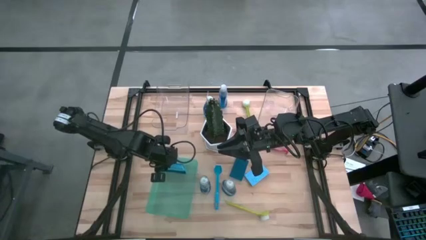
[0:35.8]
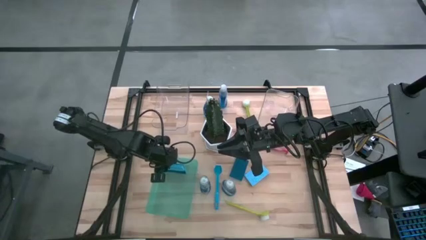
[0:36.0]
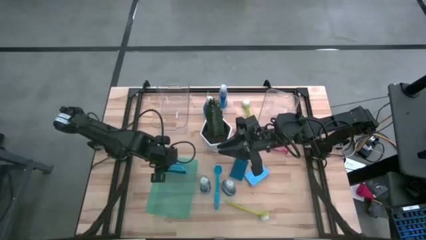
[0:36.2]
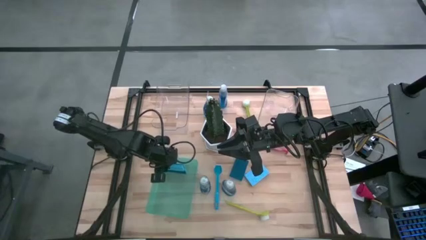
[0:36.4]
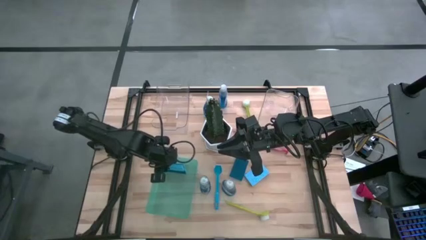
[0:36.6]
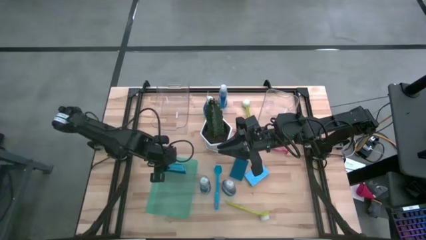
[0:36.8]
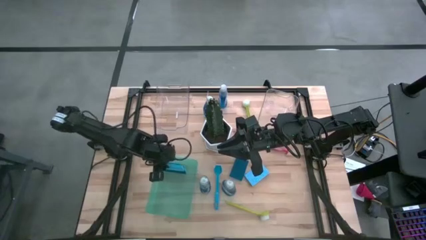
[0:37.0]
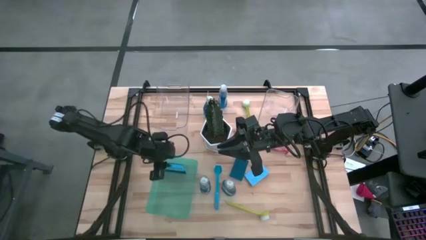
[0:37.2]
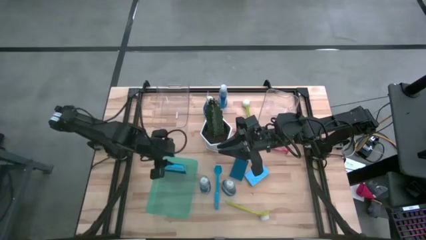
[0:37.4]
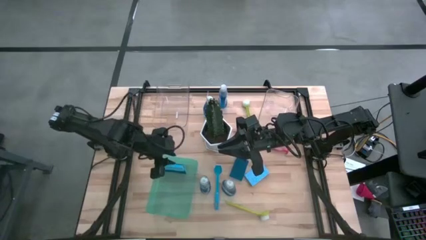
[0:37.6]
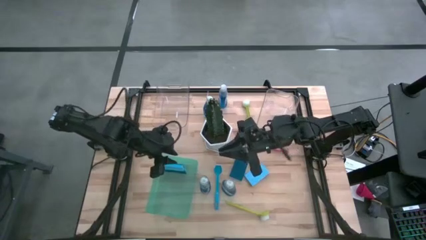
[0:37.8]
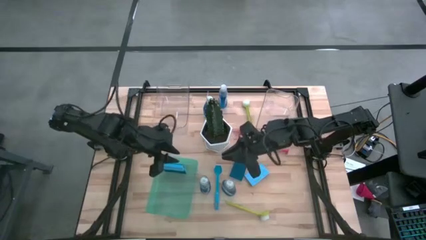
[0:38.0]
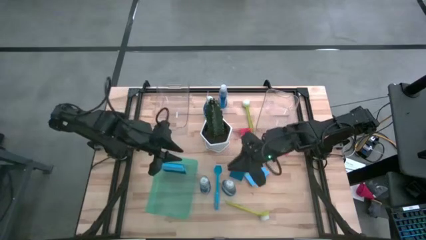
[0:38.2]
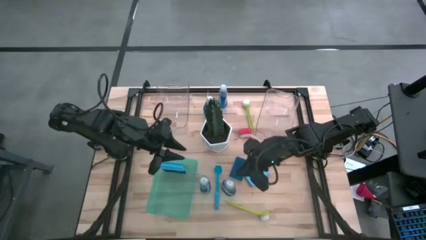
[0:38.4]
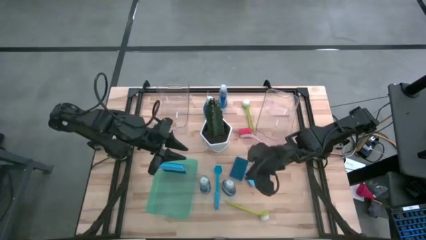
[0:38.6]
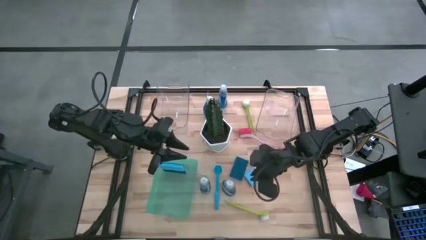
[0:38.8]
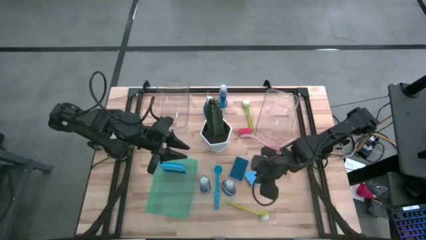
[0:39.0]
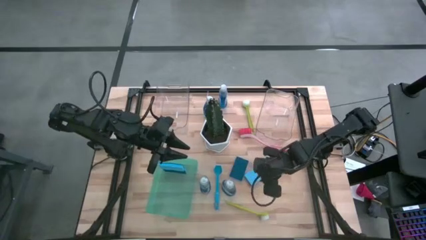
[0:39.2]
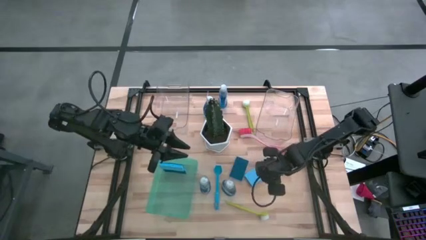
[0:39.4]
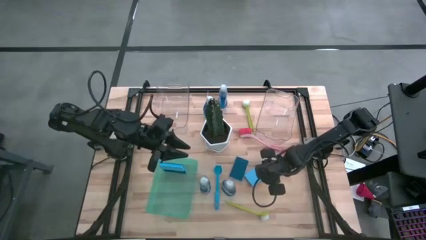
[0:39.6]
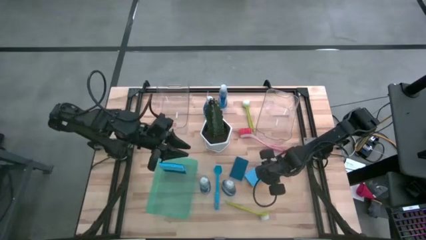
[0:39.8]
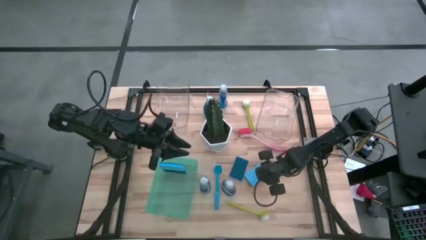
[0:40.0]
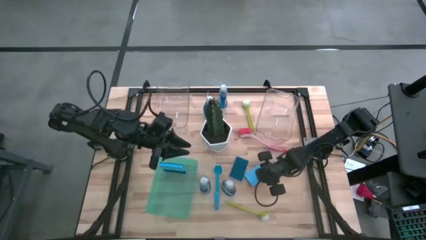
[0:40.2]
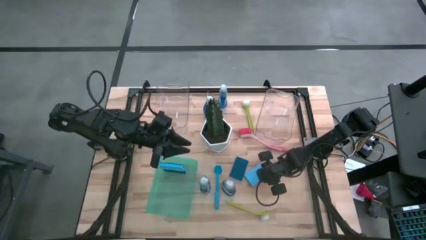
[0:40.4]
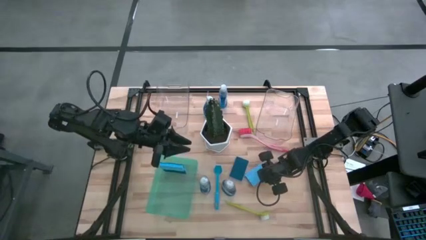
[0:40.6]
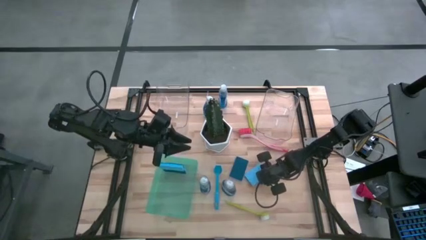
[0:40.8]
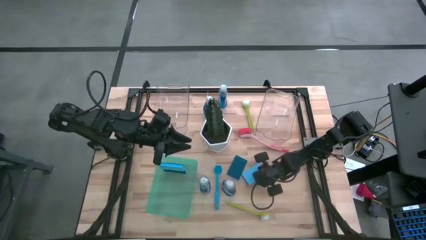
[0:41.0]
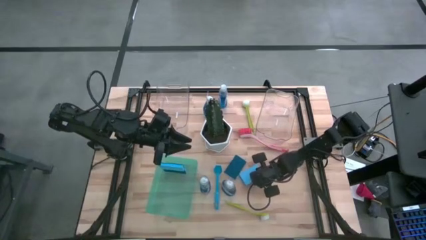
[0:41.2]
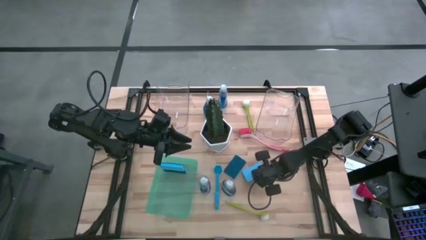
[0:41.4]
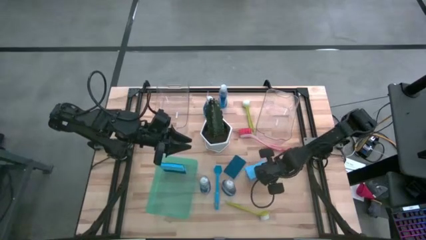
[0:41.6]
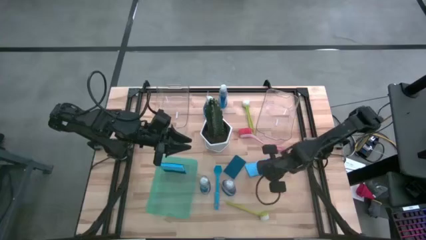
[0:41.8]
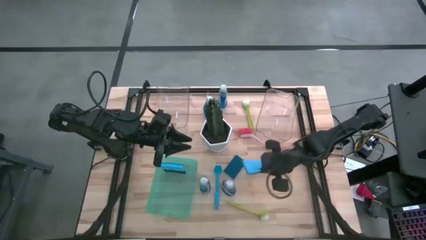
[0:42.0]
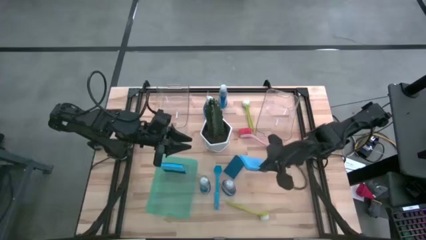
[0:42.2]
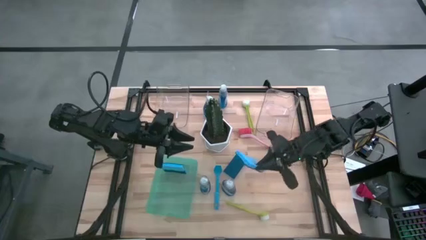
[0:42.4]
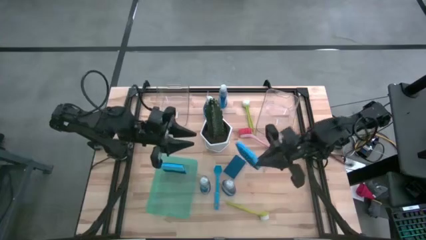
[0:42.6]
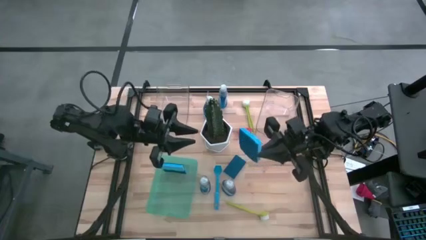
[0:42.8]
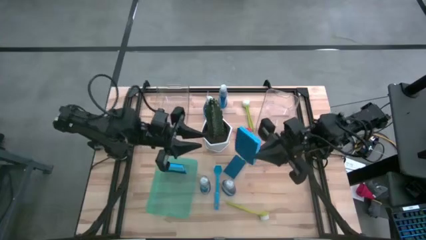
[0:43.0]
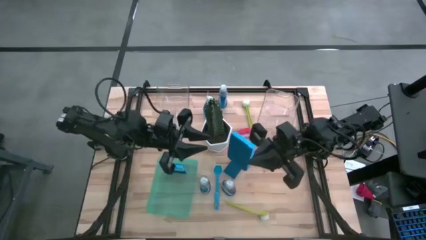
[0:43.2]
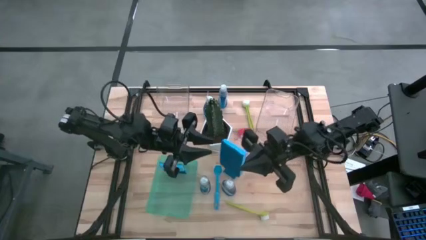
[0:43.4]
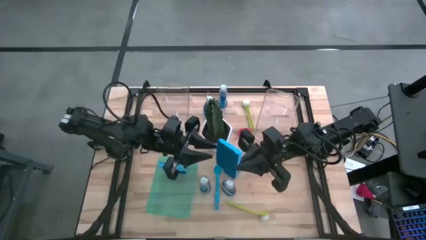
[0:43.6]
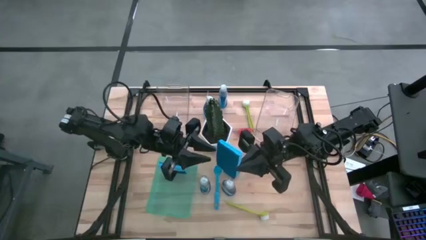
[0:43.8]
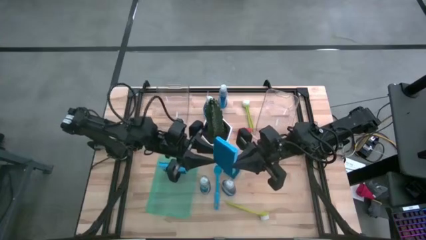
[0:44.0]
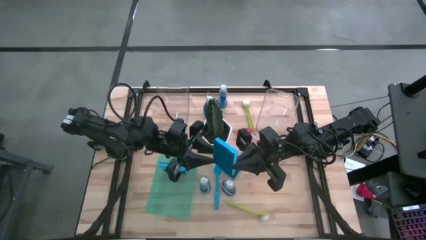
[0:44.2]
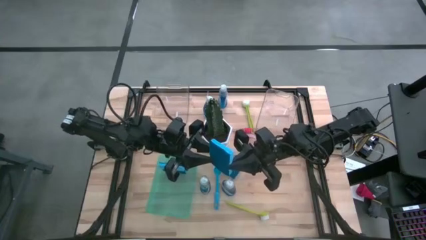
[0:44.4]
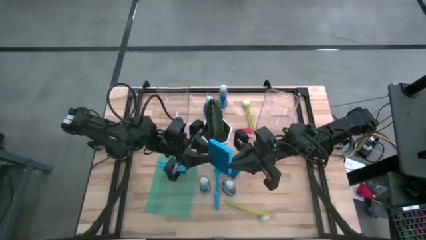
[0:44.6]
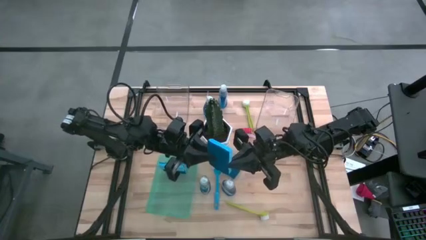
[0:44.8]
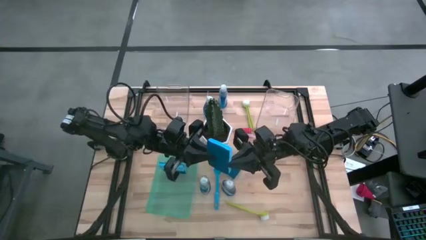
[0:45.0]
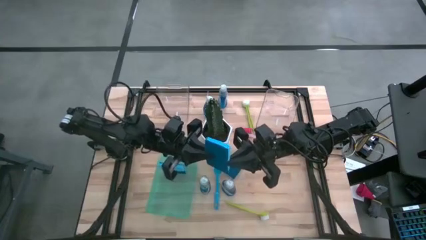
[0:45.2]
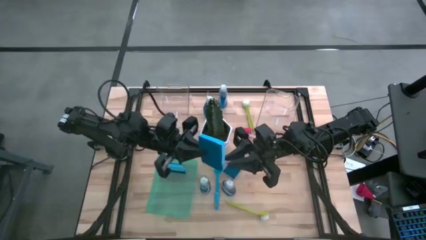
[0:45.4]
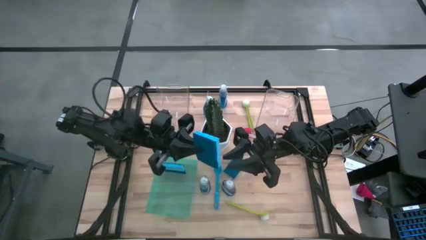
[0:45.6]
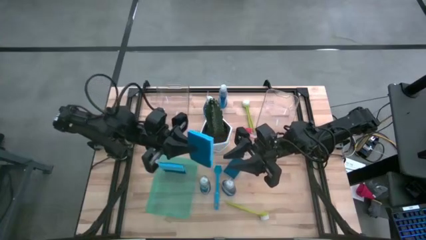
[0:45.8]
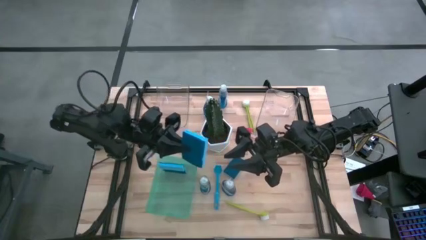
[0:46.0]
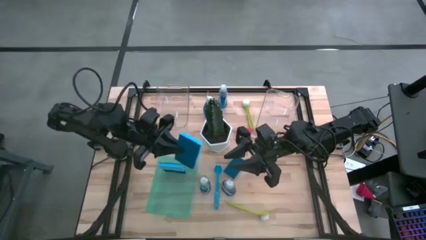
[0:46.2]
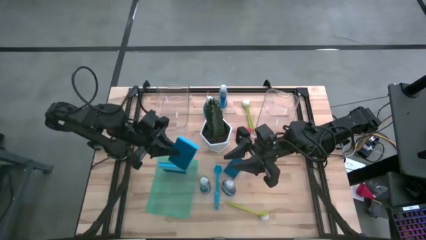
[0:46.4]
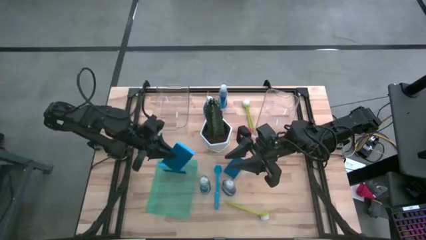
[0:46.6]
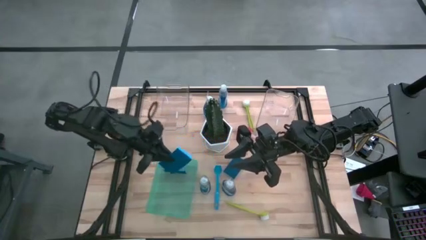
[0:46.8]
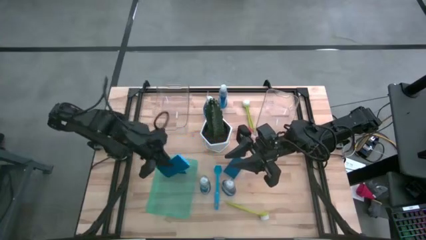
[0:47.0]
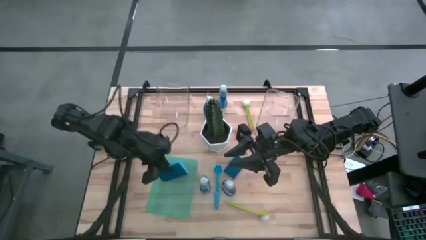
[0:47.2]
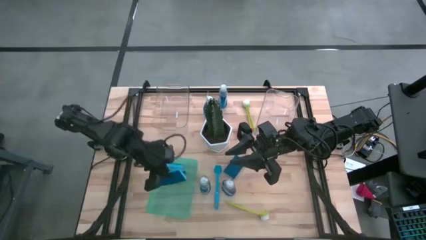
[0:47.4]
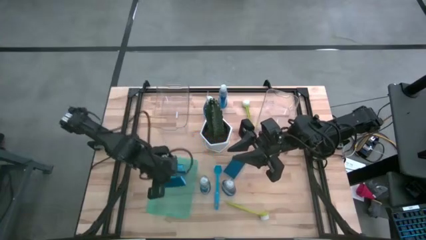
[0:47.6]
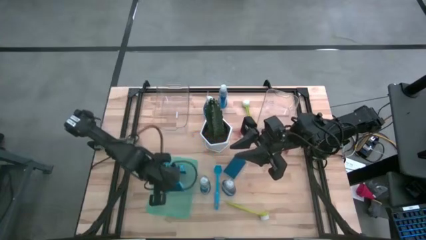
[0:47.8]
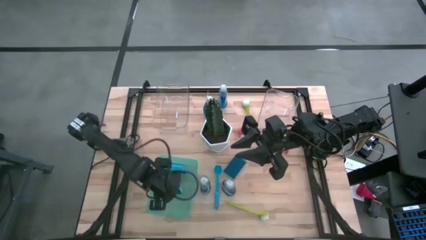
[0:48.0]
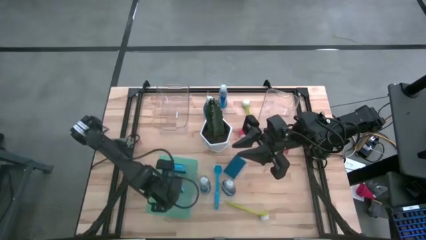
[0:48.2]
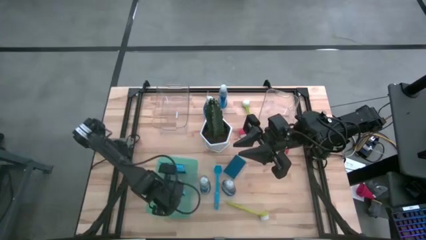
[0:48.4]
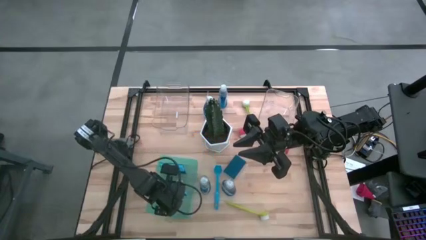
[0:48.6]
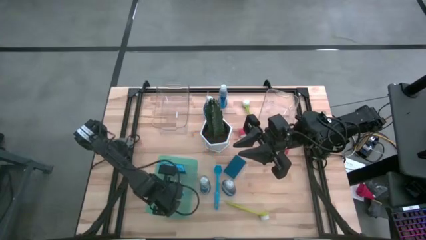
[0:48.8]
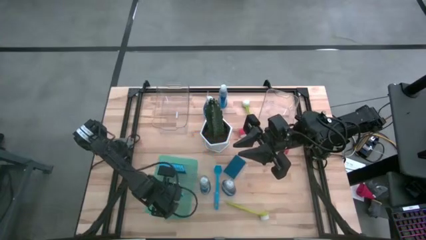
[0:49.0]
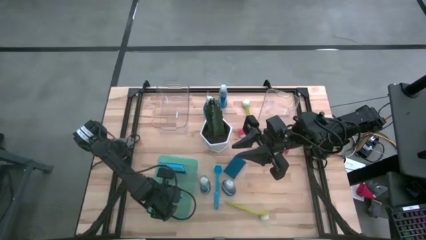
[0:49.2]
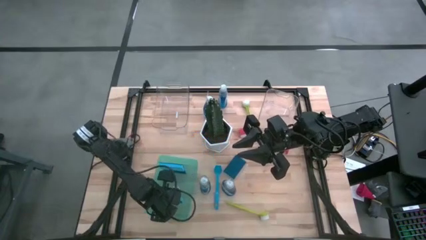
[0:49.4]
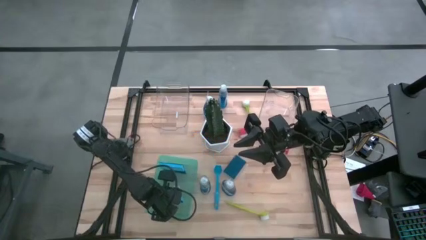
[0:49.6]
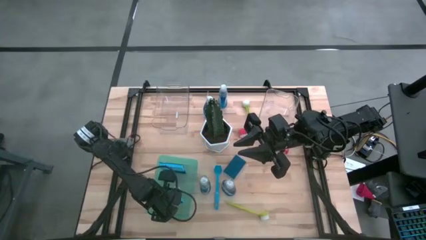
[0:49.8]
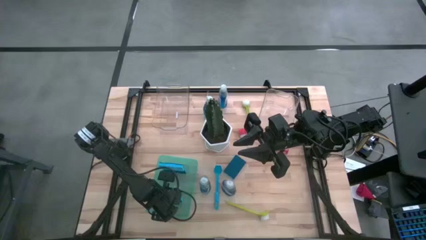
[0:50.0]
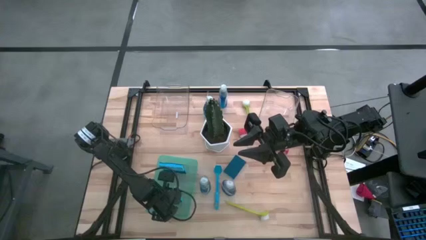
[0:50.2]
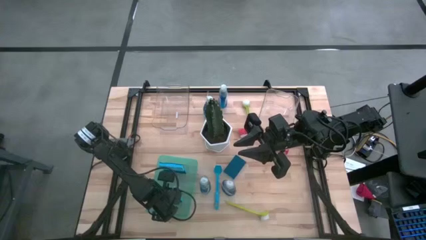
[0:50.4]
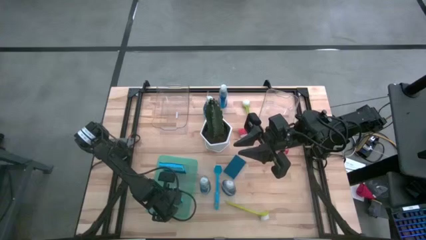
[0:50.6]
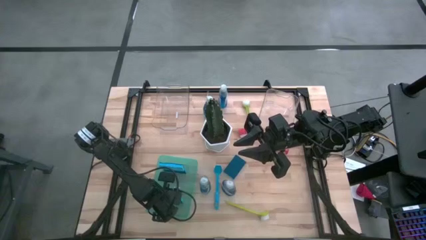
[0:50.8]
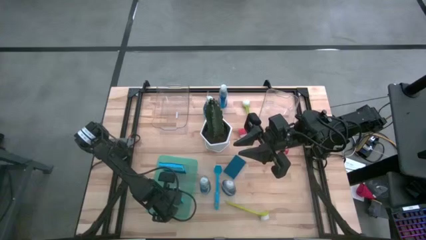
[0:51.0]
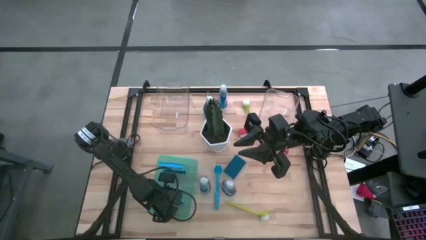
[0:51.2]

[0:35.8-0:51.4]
Task: Pick & Place Kitchen Sink Supplies
Put the blue sponge wipe into the green bin
